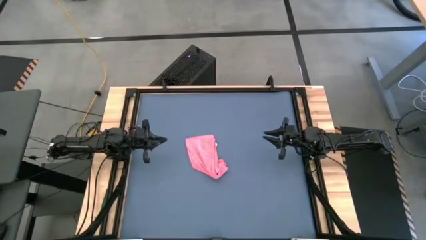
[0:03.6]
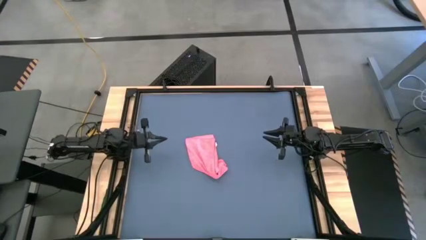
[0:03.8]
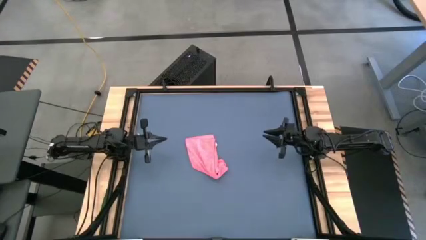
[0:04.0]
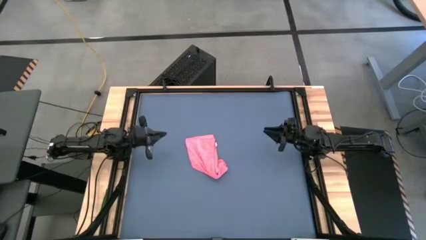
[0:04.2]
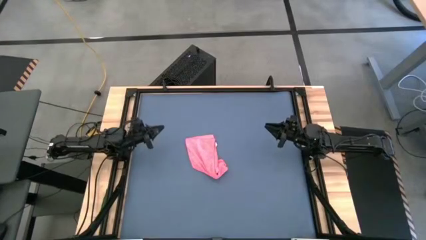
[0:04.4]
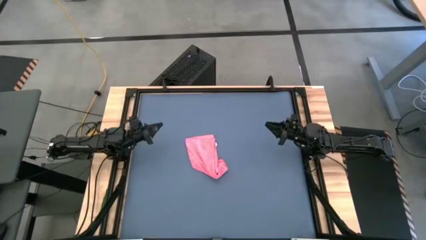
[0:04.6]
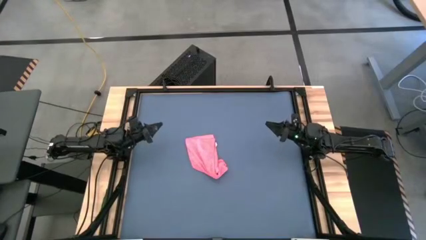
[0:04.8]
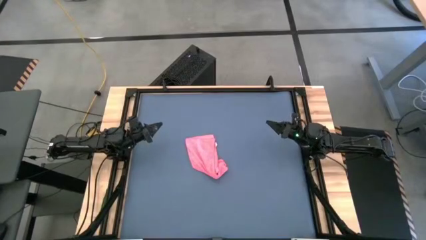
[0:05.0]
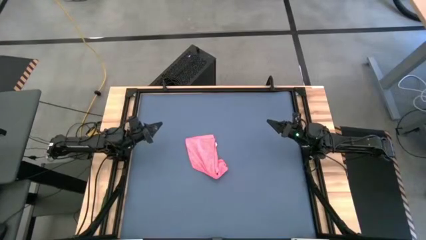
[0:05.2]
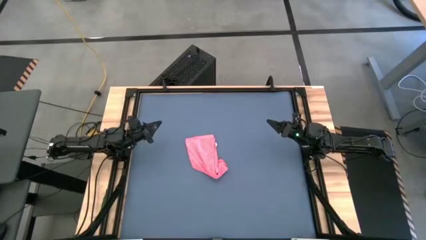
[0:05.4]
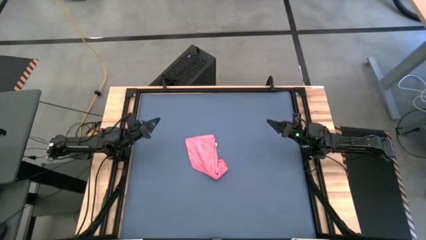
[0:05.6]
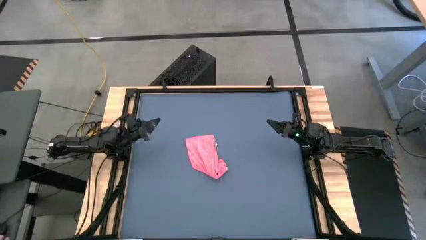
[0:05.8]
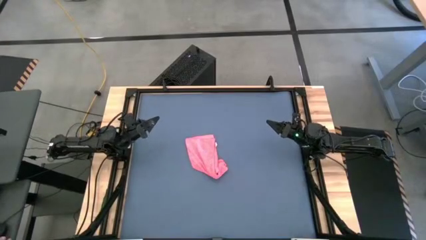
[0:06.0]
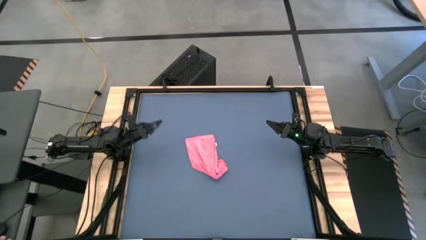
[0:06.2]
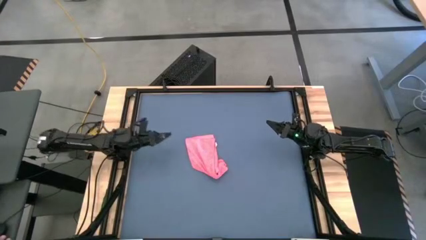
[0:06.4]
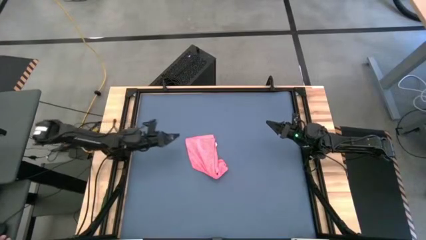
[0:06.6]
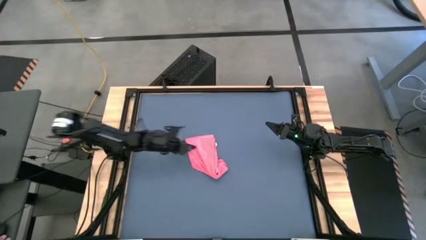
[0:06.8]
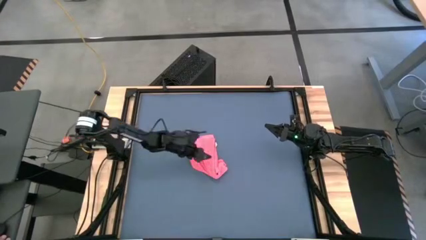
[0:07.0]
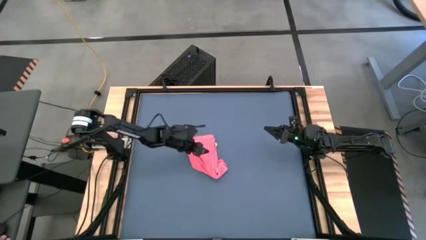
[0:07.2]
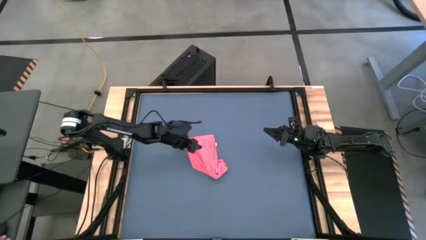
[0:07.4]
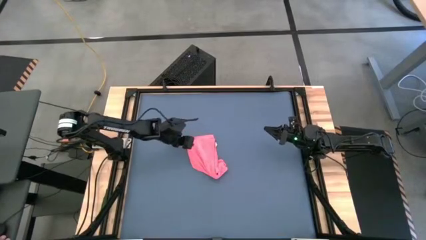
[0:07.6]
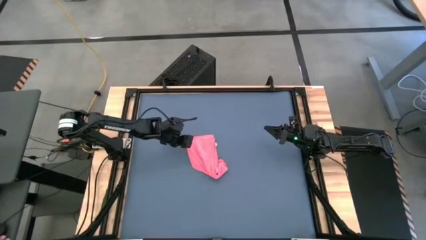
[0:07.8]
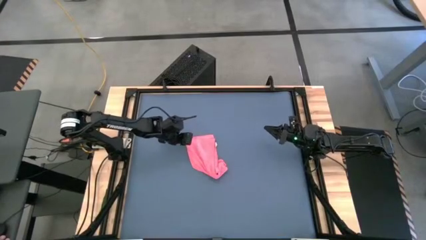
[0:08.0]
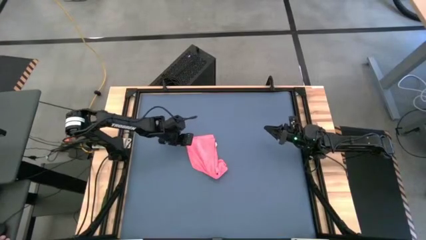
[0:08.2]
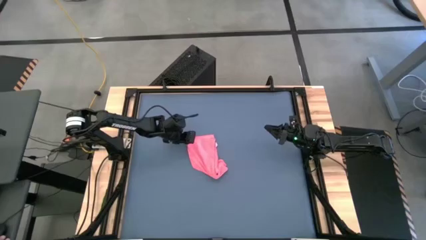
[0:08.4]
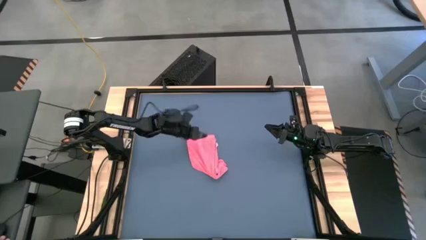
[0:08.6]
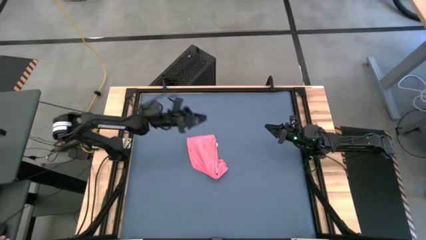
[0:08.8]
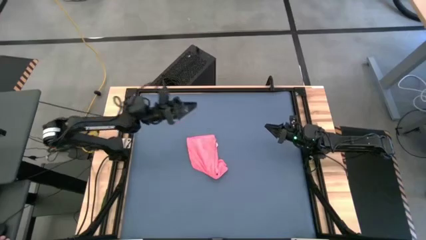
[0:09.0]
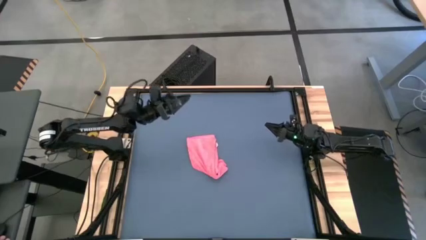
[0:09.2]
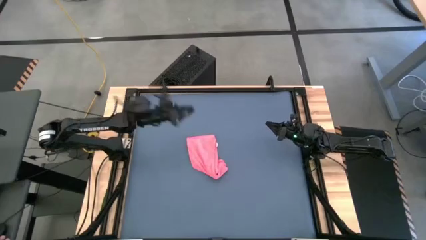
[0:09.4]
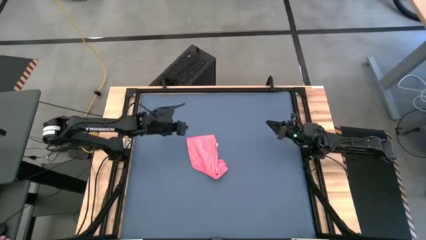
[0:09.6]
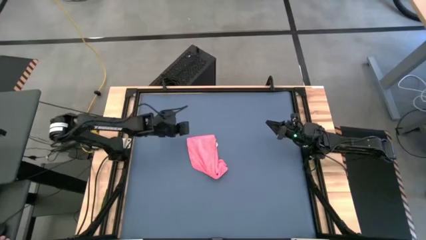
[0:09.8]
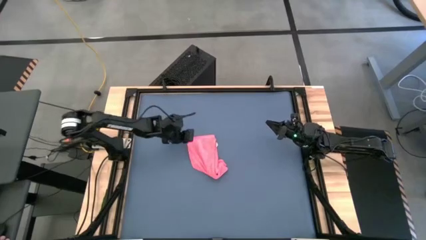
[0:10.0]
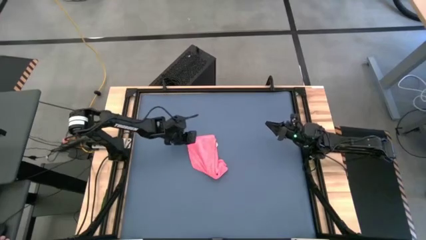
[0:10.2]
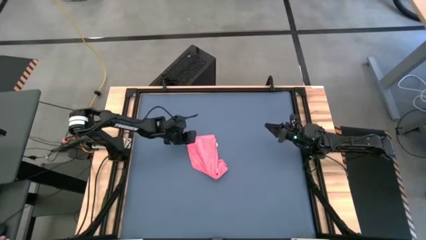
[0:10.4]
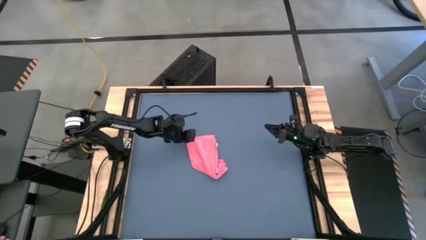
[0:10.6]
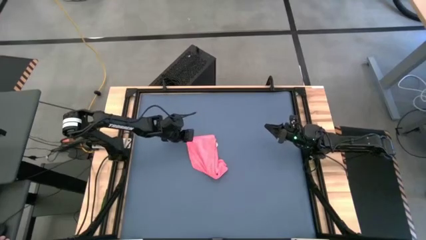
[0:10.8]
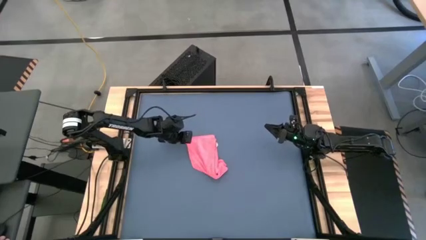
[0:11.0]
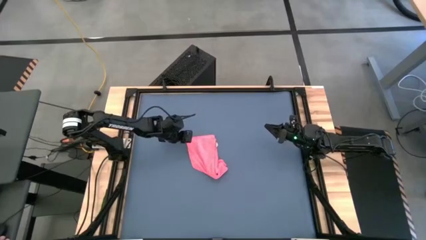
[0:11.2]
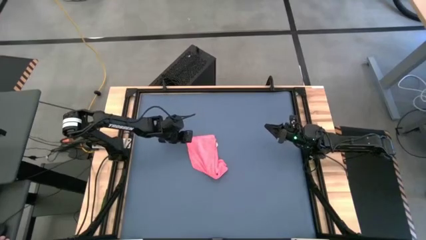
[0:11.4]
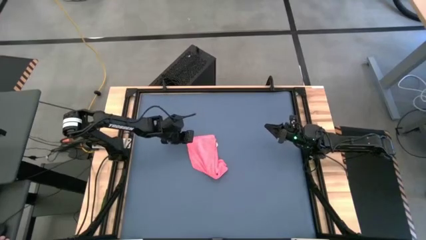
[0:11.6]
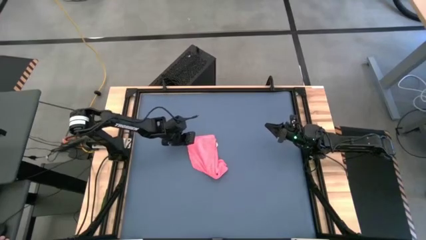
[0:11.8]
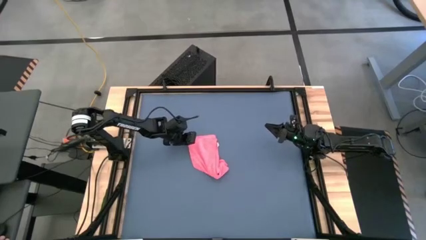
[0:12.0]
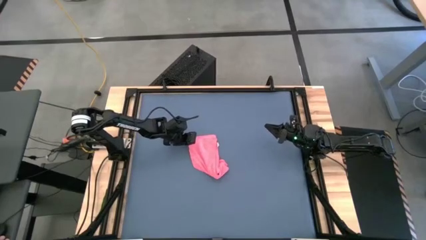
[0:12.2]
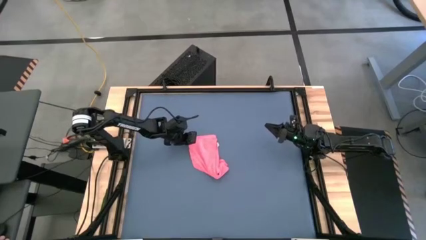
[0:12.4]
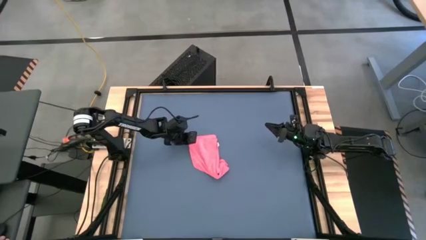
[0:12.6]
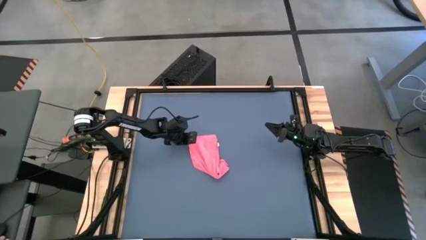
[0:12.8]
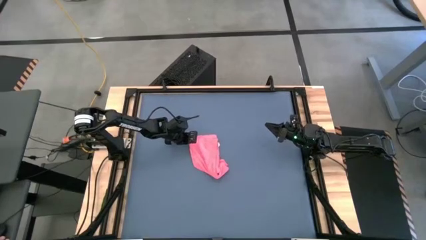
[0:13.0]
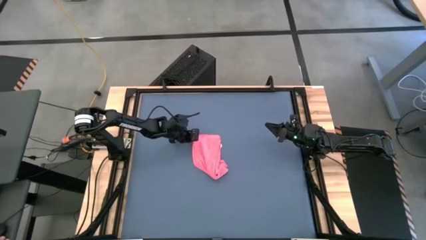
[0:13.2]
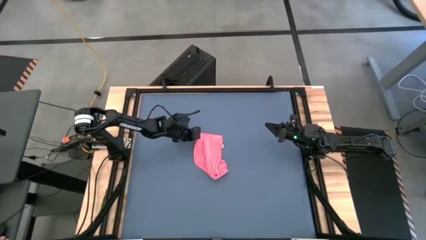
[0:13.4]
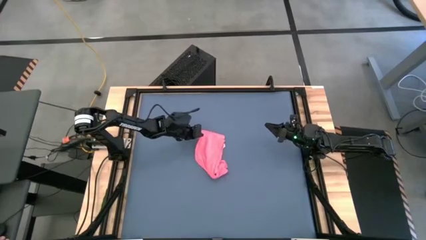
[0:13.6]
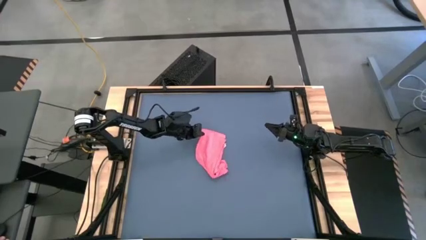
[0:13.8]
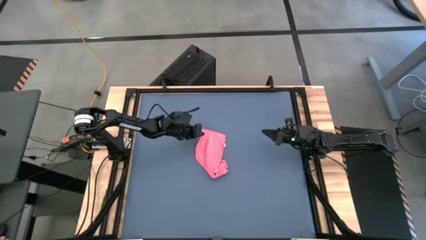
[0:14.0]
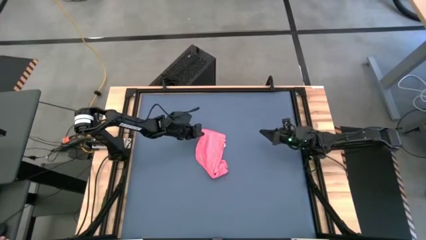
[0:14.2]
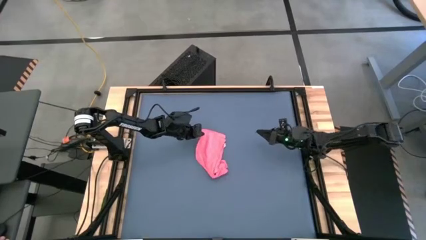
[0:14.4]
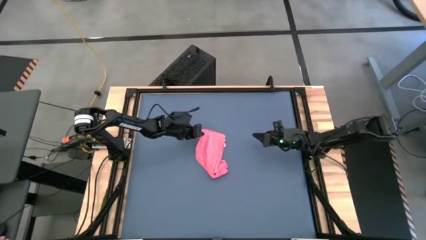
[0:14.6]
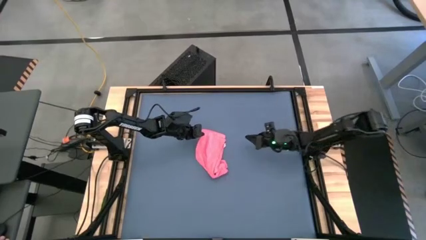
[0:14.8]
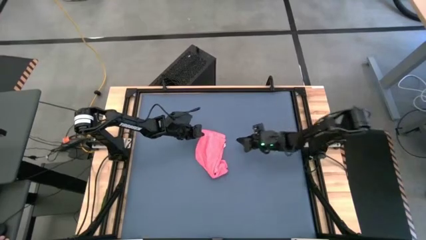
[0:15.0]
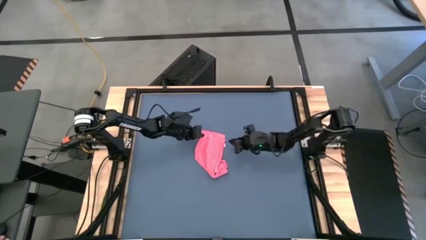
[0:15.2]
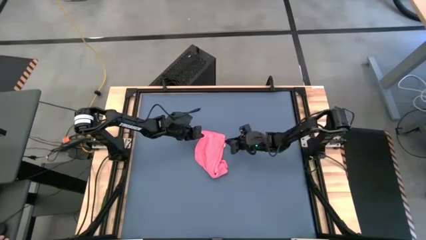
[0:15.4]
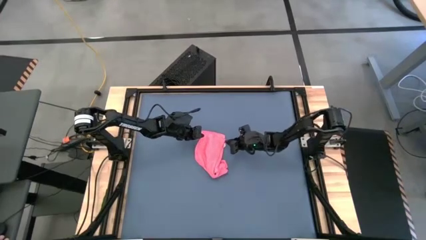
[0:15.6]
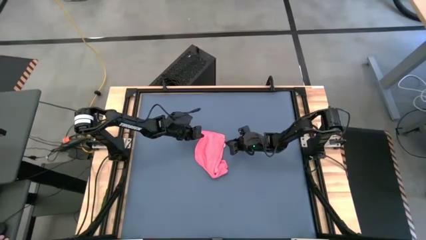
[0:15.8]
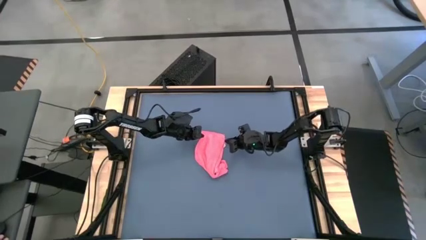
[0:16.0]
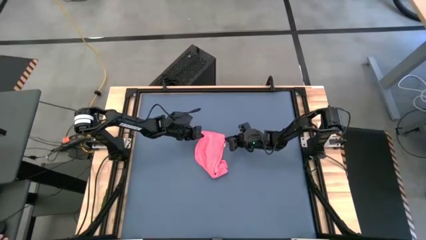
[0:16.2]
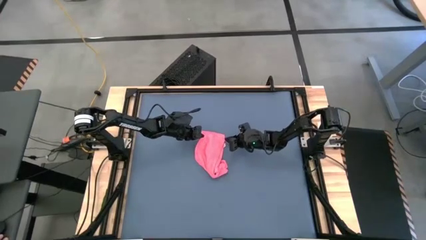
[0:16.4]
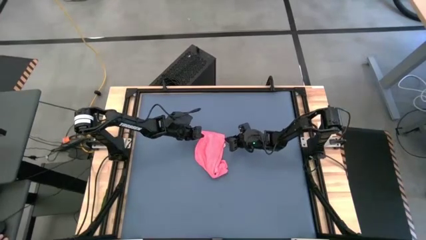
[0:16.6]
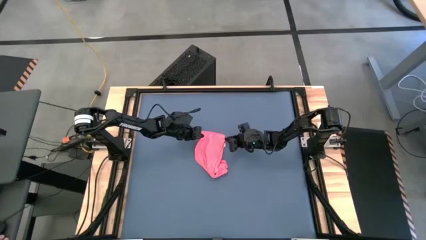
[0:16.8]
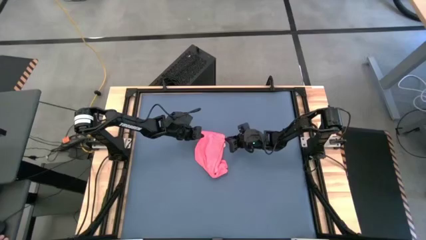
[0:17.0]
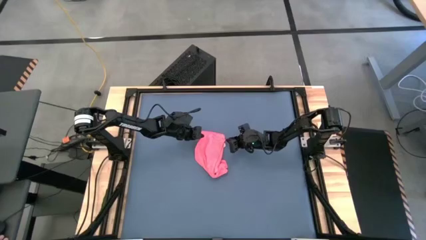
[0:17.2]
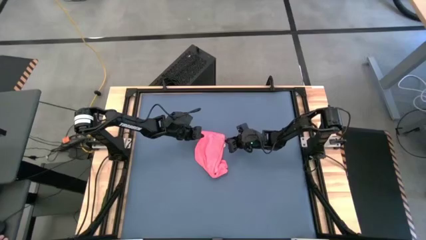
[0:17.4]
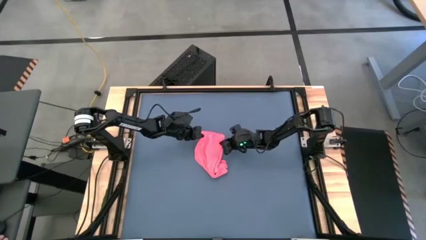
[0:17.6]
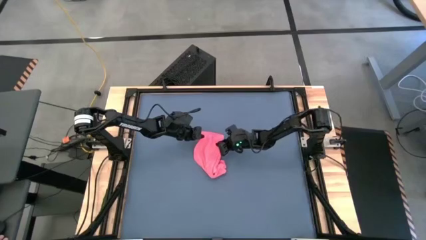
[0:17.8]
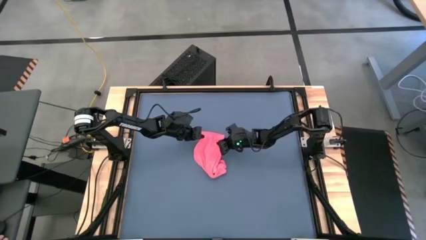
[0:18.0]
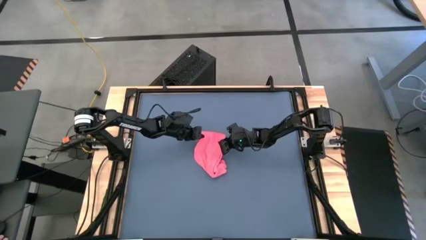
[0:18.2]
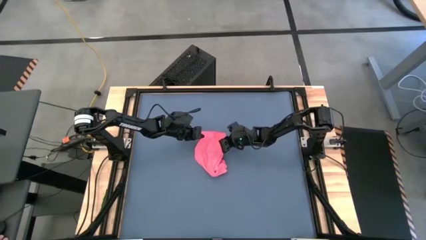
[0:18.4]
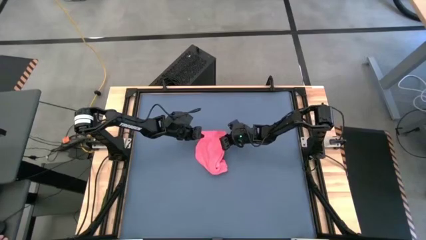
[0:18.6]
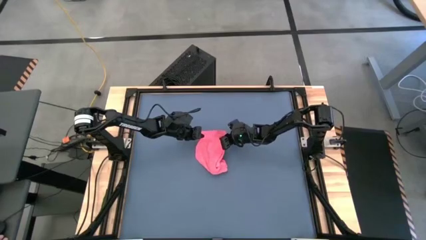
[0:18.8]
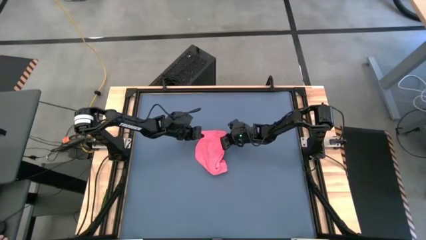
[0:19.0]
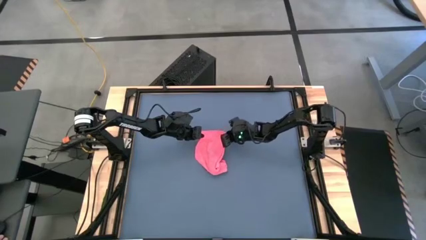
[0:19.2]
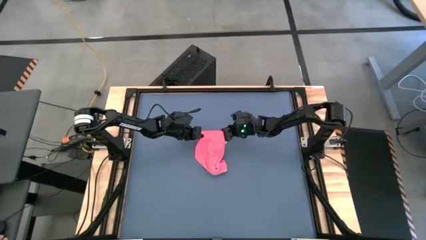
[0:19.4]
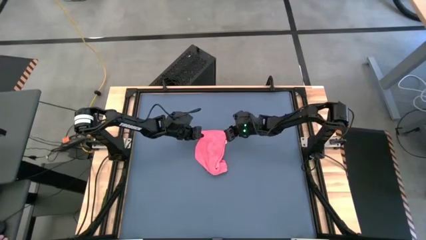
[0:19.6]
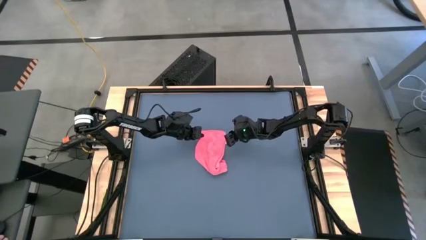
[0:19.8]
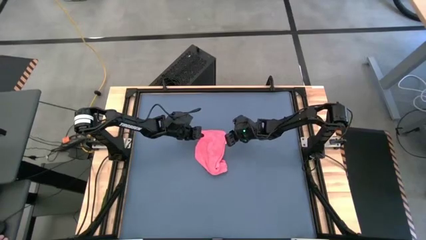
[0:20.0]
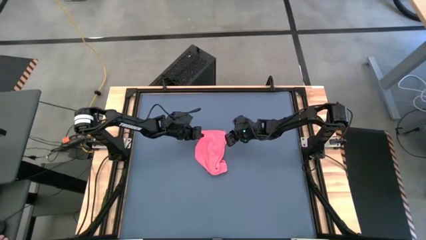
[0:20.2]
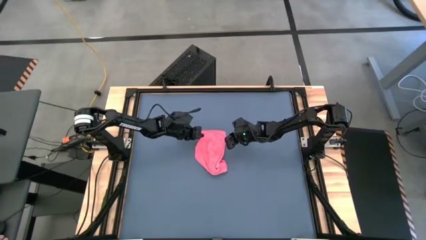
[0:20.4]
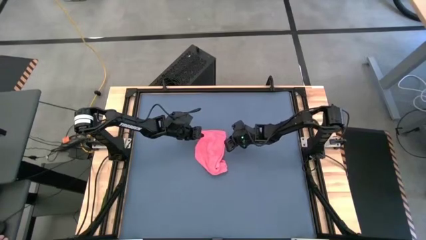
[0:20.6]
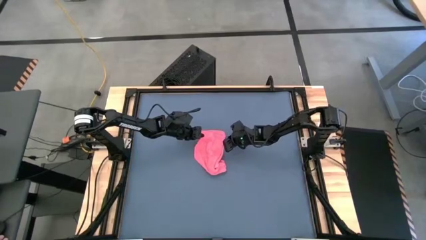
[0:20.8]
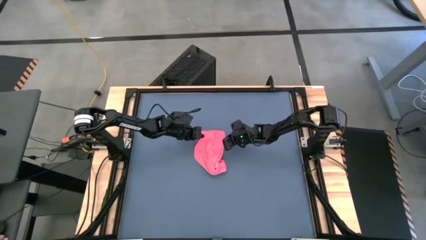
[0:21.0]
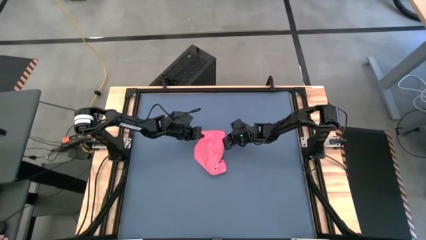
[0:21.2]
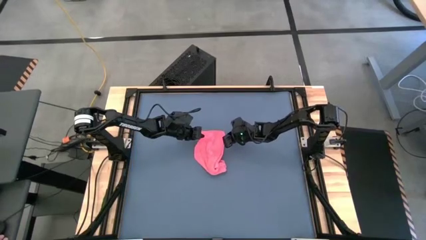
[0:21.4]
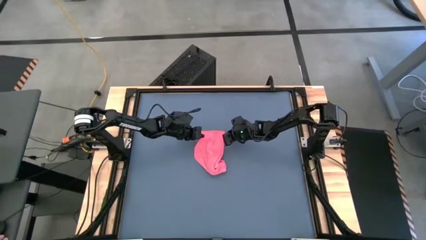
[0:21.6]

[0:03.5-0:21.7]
Task: Roll towel
Roll the pink towel
